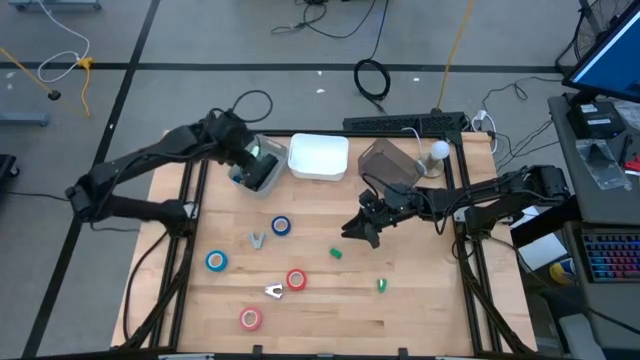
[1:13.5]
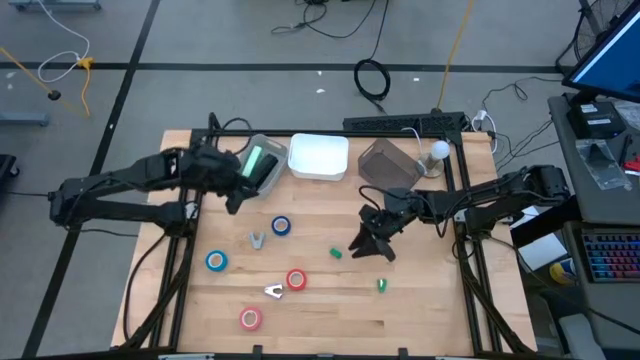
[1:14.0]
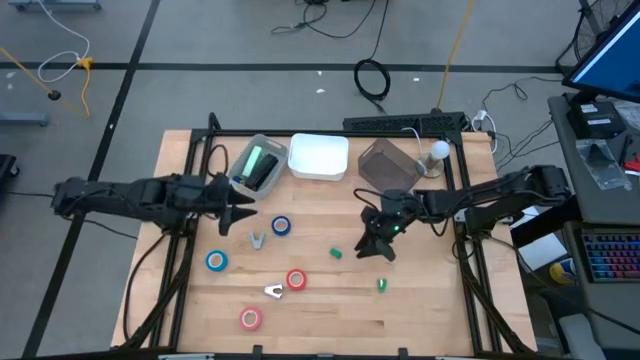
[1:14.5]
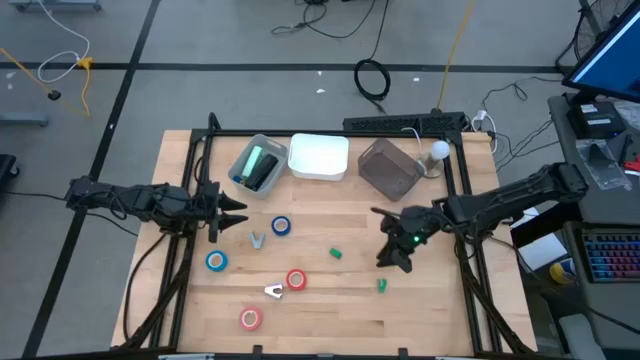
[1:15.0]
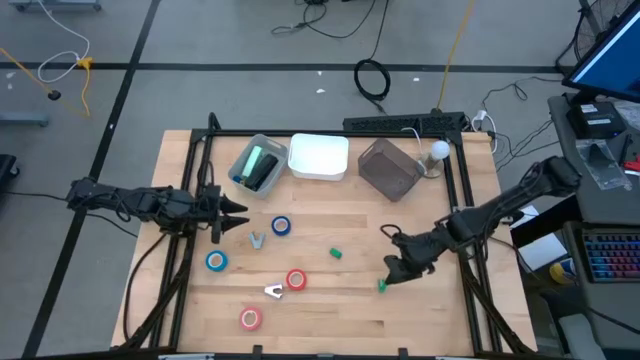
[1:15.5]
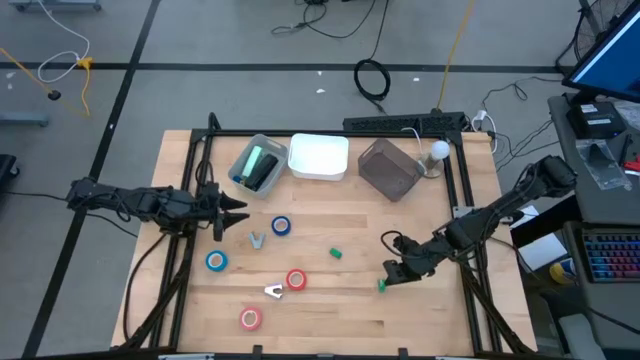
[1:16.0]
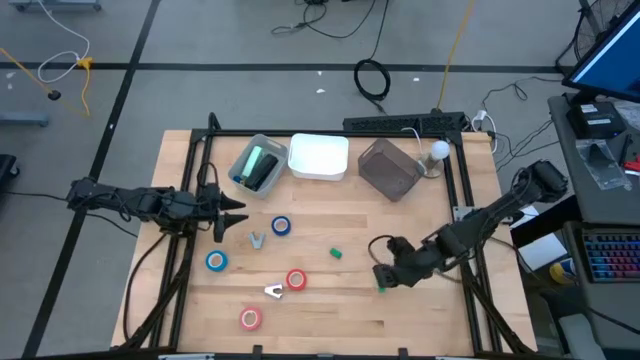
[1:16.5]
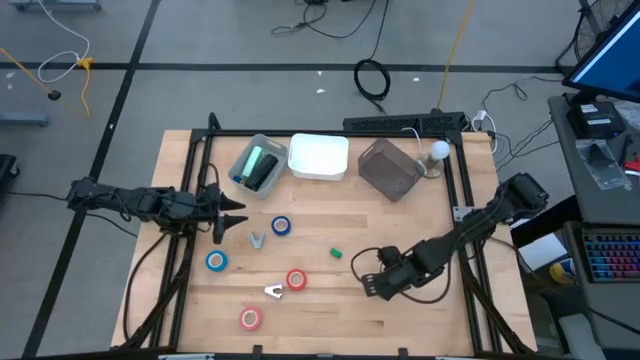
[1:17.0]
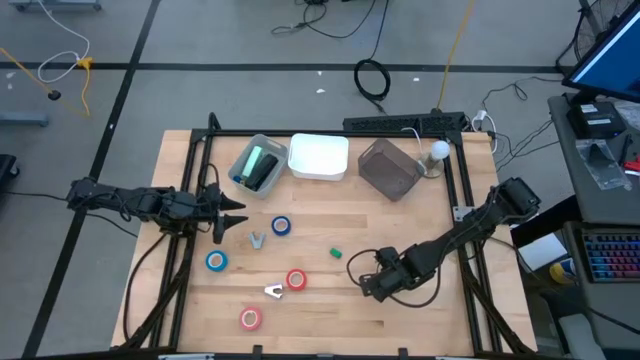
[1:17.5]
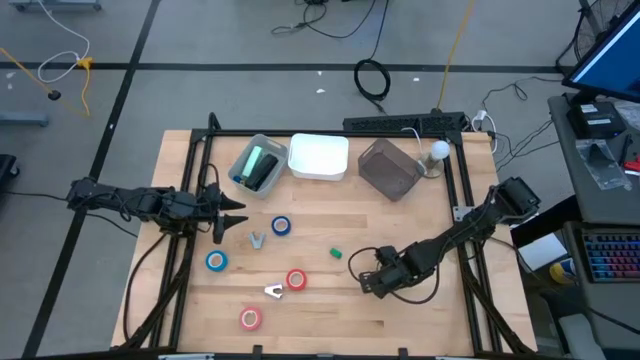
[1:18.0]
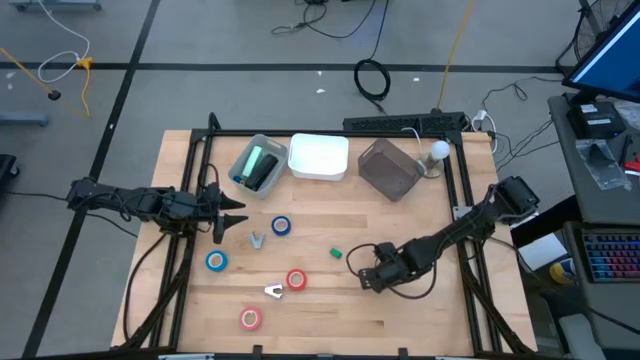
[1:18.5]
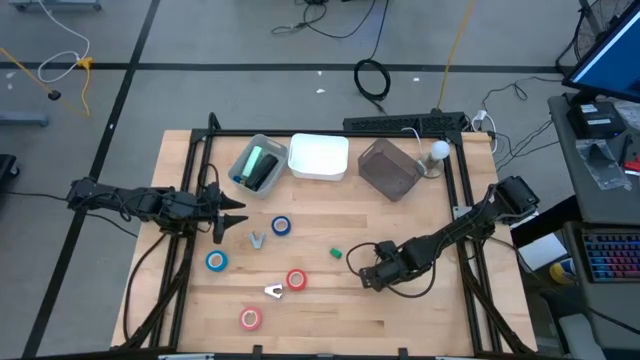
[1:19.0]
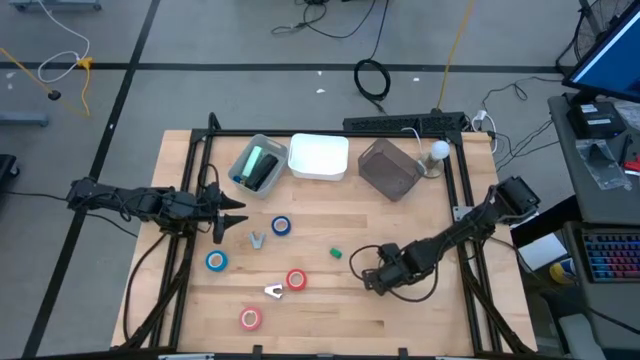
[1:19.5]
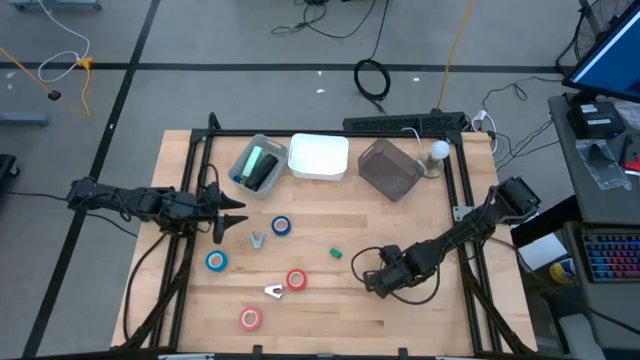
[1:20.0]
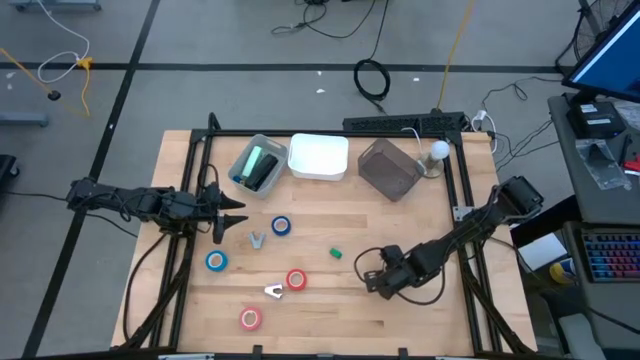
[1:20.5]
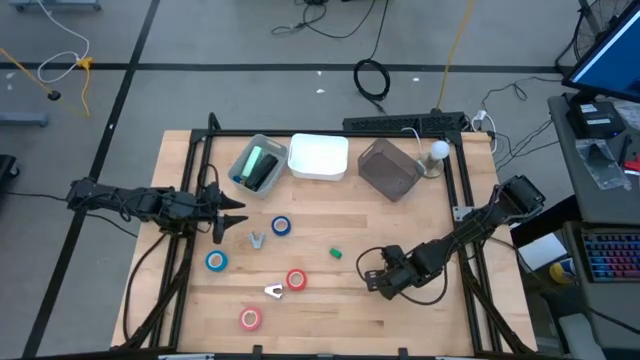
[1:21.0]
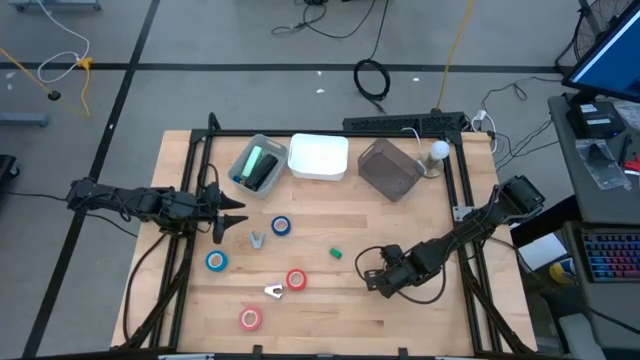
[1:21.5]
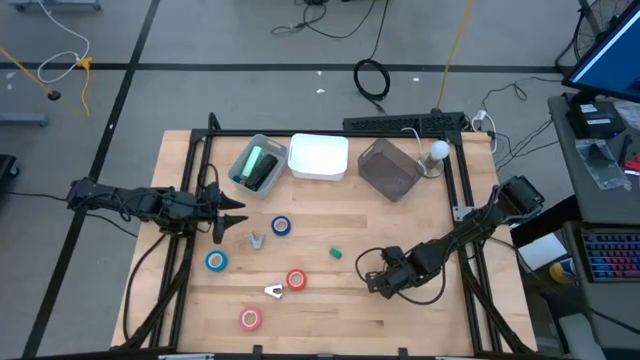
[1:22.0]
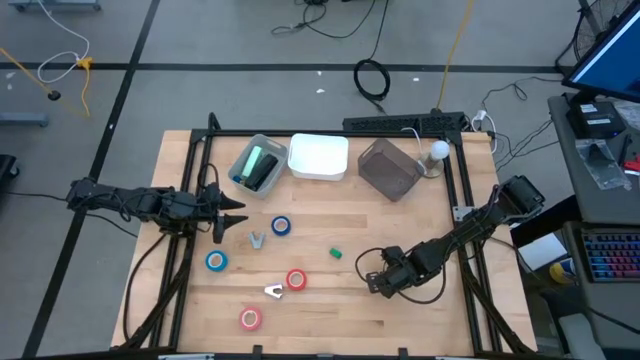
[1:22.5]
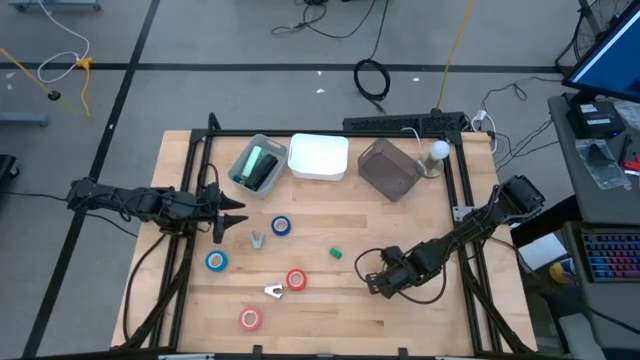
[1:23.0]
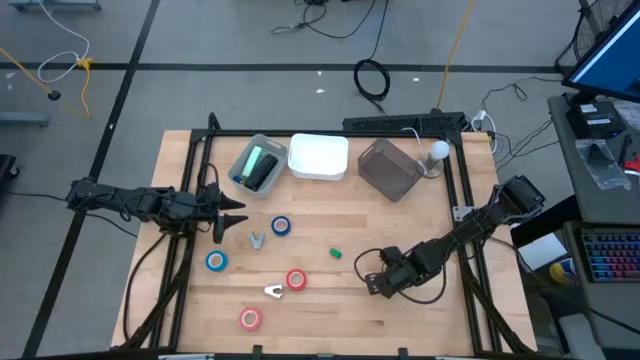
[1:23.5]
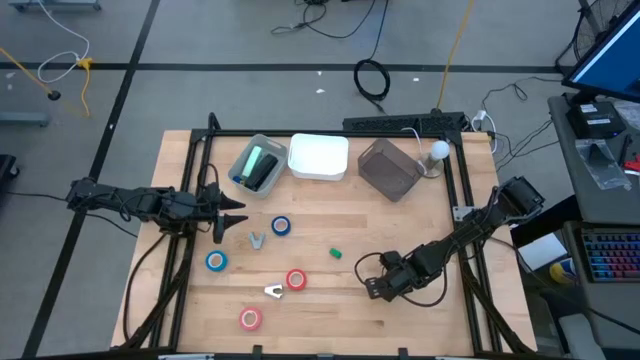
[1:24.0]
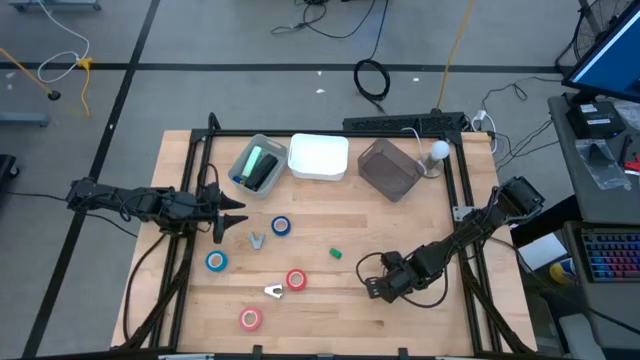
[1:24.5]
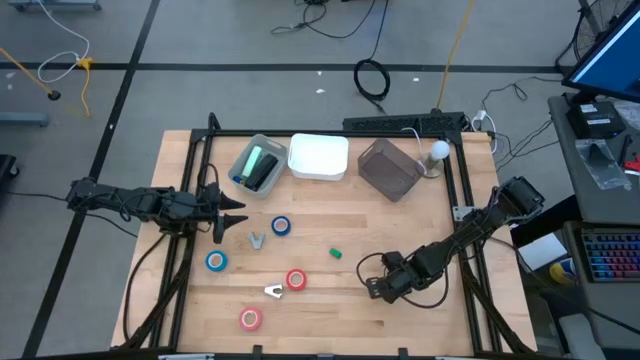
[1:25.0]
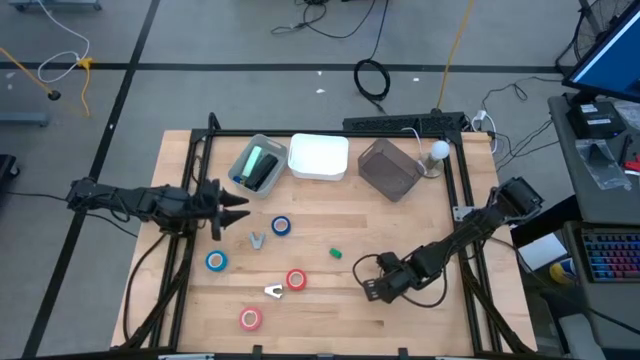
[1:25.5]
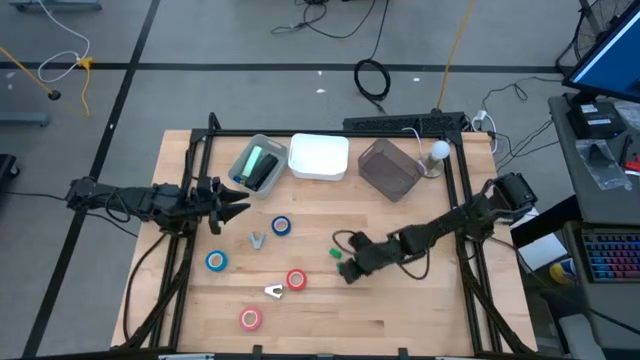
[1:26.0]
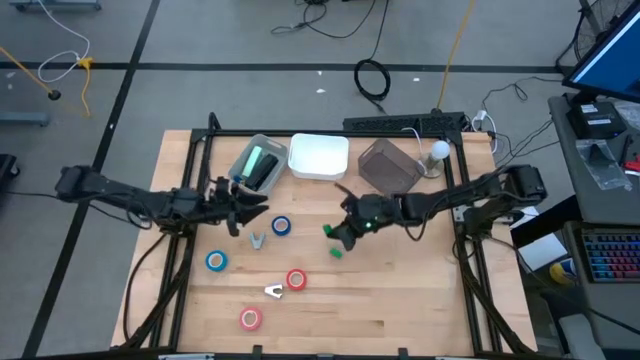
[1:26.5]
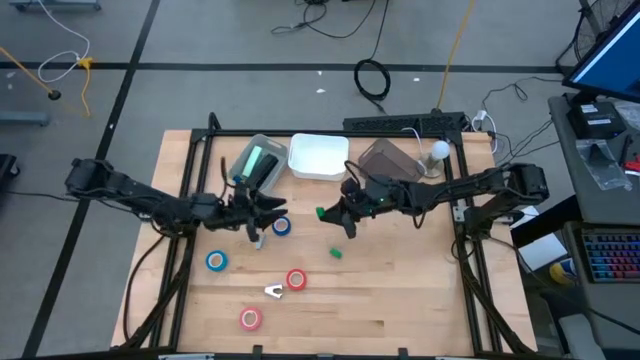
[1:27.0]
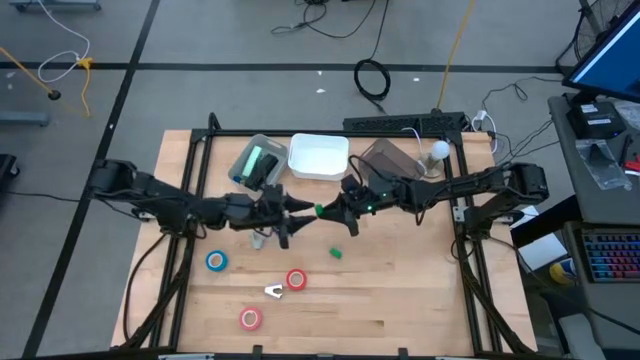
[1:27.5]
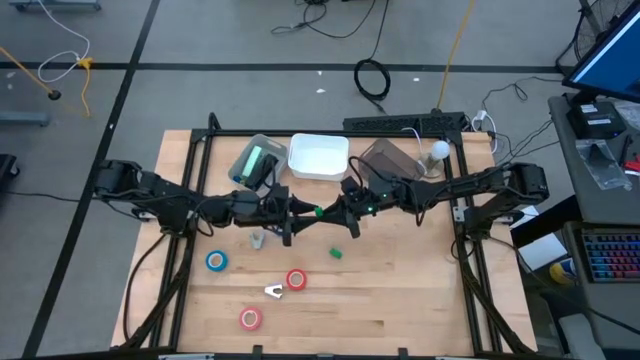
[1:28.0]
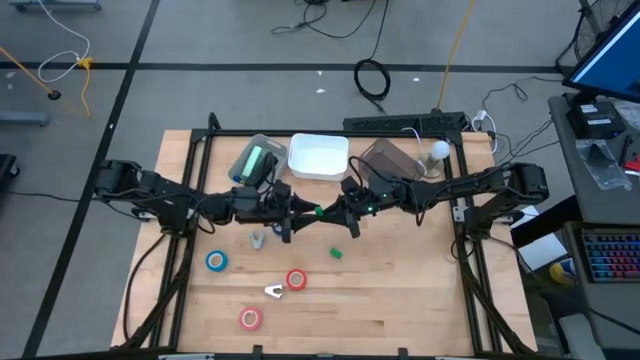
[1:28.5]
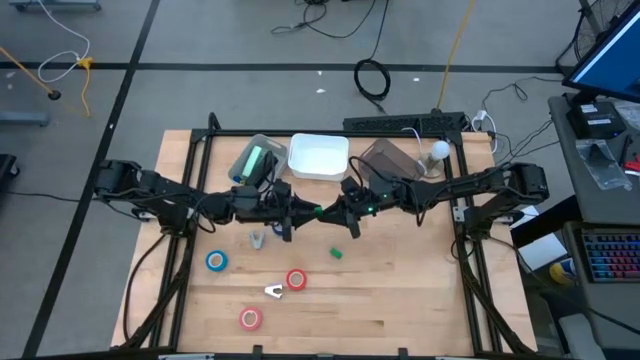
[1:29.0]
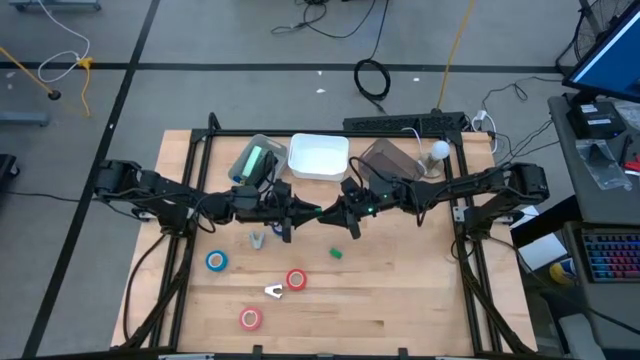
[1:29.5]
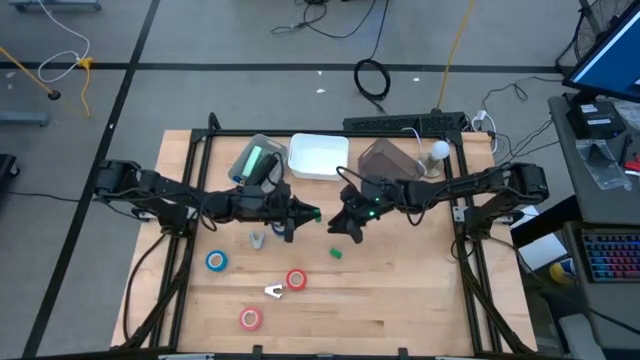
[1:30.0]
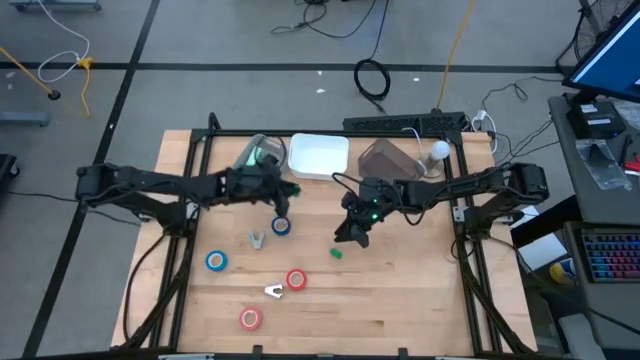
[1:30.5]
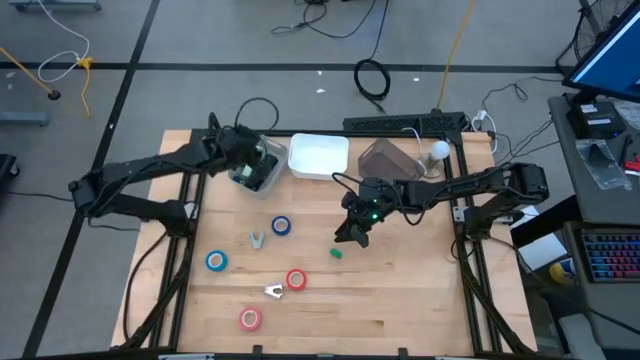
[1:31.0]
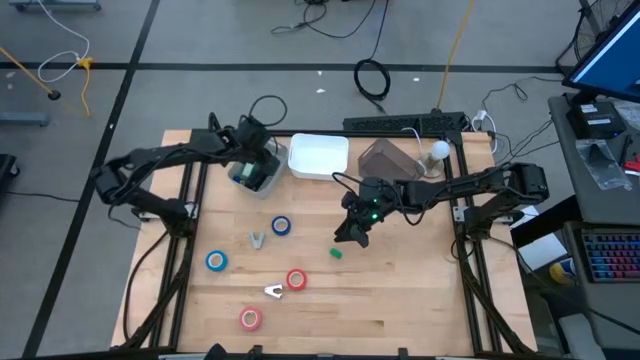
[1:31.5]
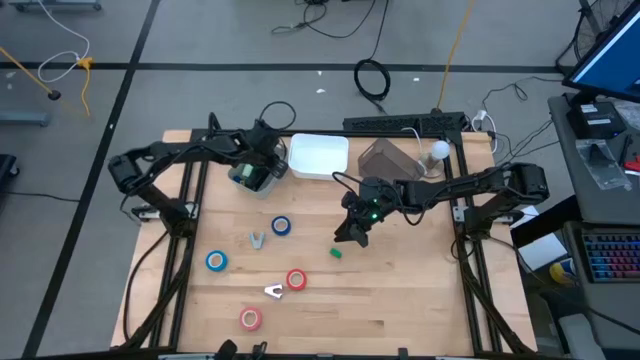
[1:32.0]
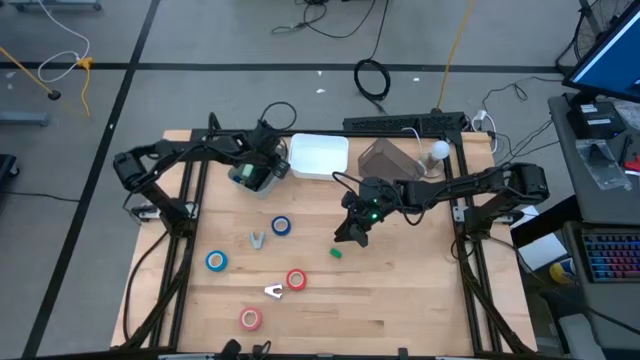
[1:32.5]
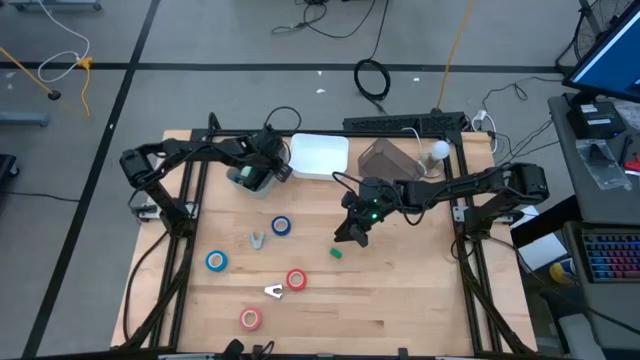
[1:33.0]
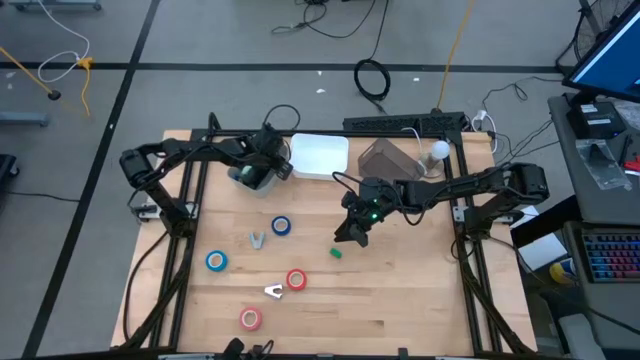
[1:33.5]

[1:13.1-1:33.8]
Task: Pick and place Stapler, Stapler remover, tape
Put the right green stapler into the gray bin

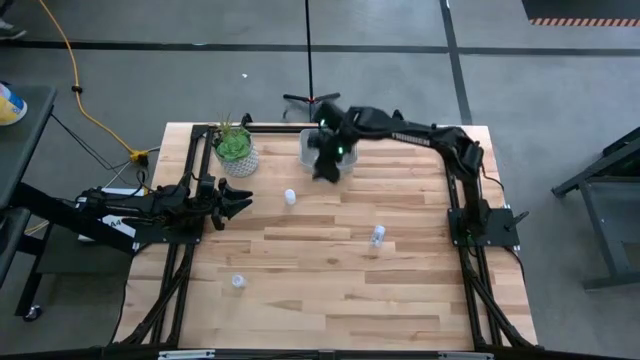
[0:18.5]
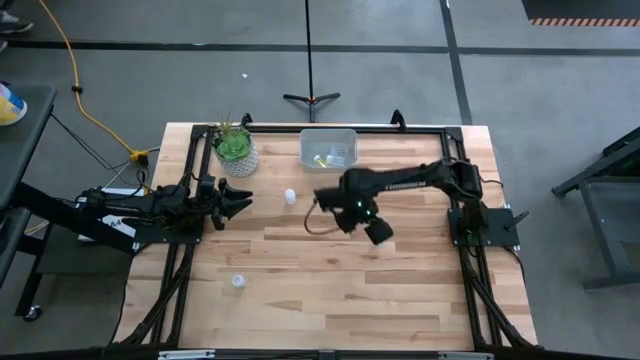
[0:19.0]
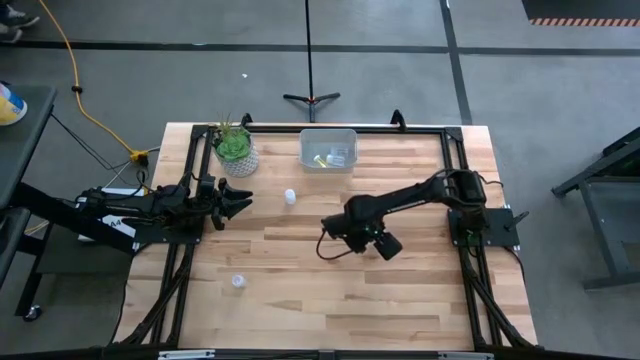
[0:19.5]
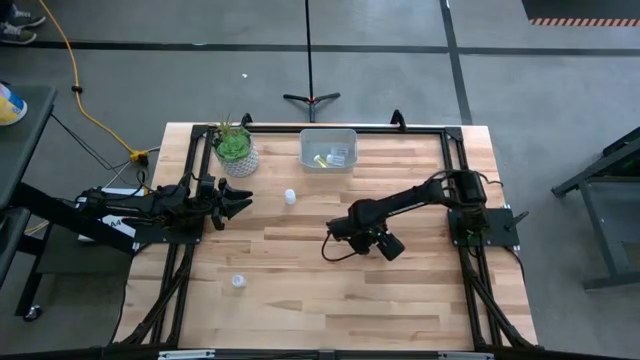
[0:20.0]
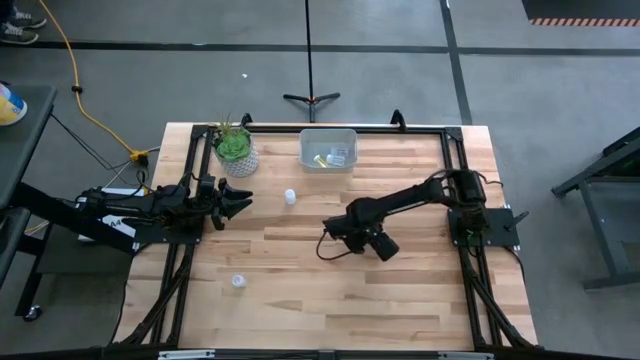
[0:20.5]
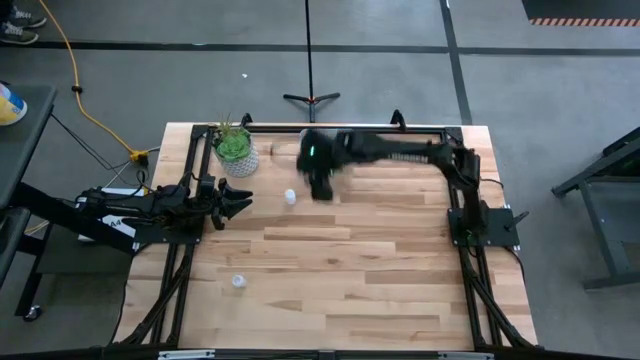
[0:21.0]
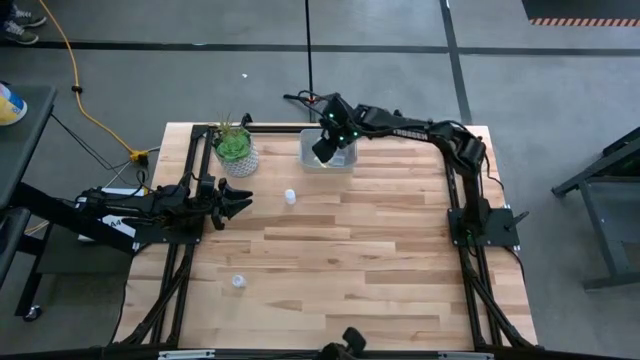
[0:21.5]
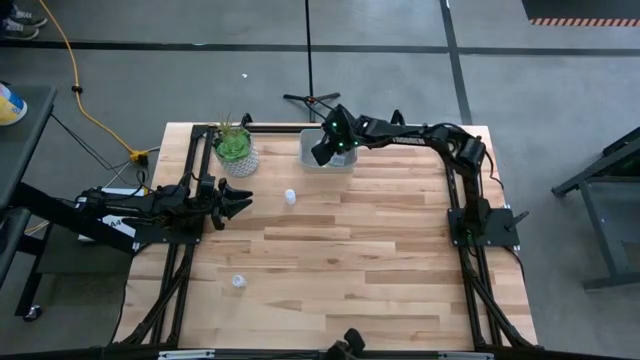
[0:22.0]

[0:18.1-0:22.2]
Task: Pick and place pill bottles into a basket
Put the transparent pill bottle into the gray bin
